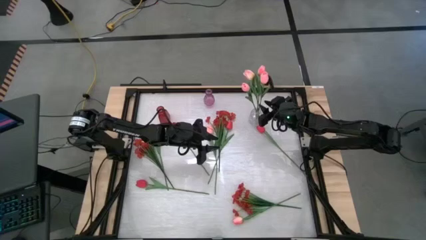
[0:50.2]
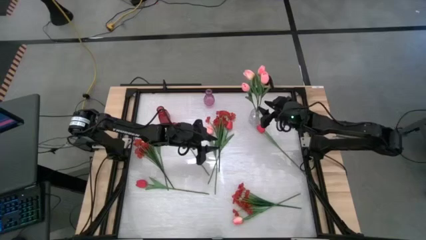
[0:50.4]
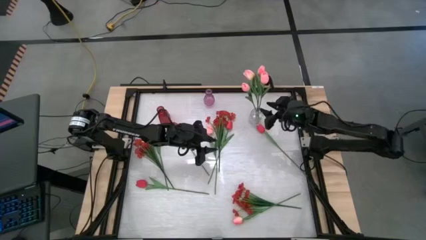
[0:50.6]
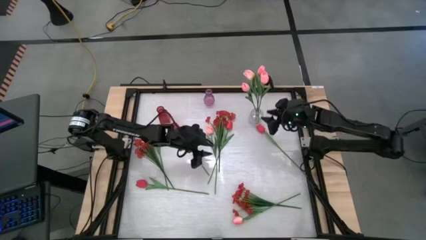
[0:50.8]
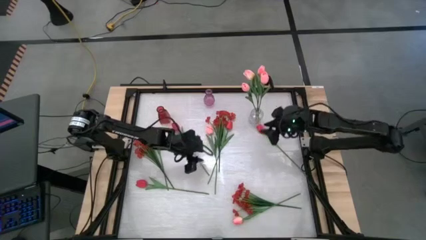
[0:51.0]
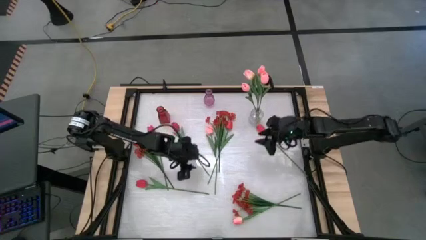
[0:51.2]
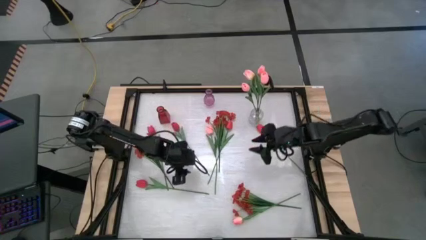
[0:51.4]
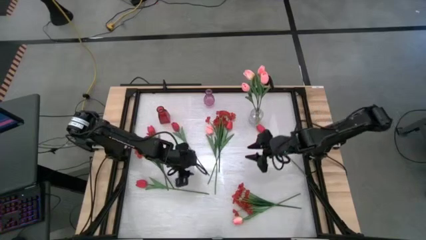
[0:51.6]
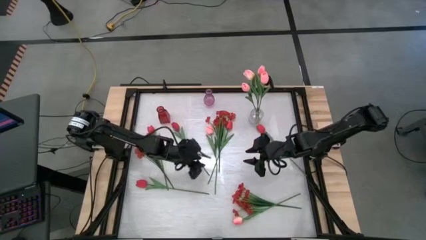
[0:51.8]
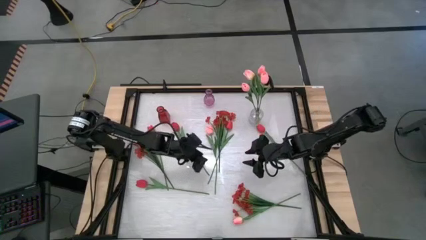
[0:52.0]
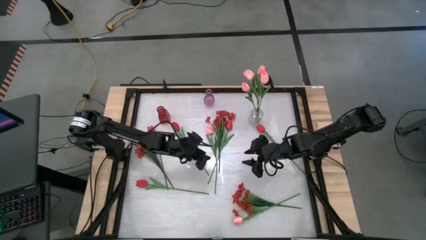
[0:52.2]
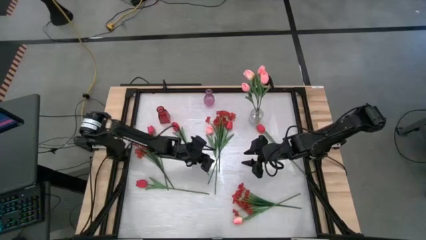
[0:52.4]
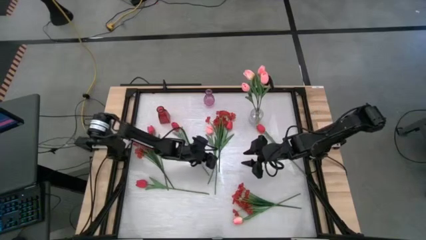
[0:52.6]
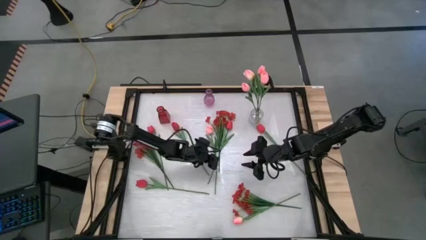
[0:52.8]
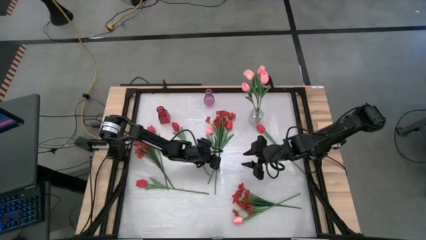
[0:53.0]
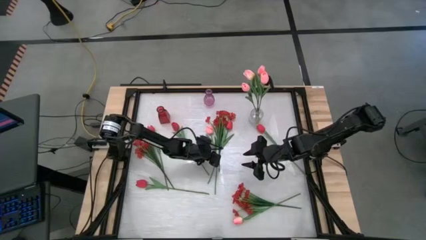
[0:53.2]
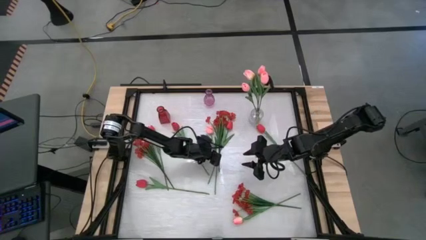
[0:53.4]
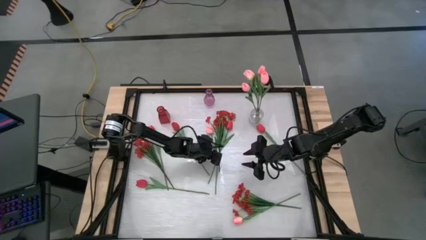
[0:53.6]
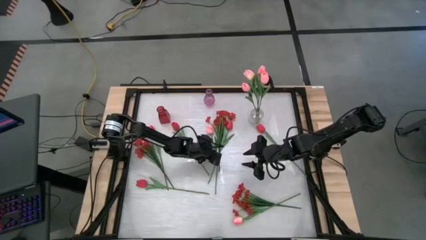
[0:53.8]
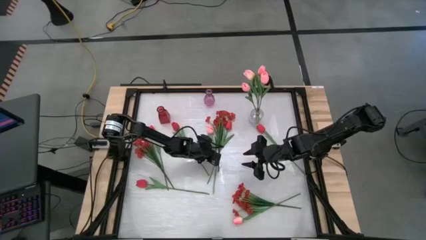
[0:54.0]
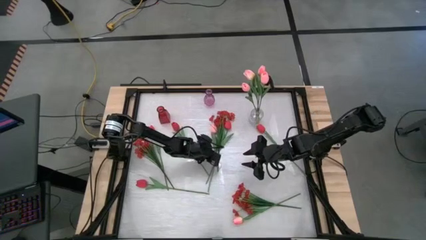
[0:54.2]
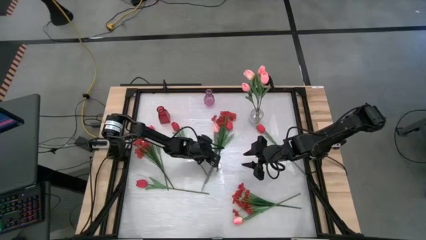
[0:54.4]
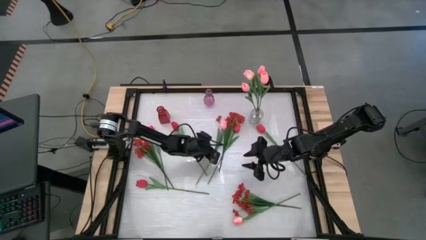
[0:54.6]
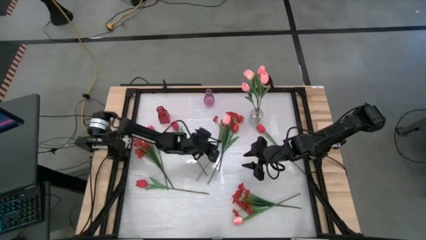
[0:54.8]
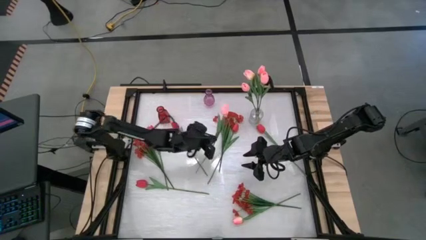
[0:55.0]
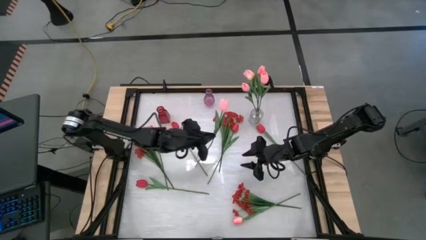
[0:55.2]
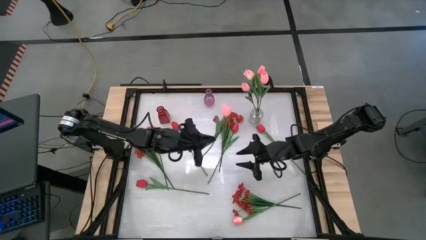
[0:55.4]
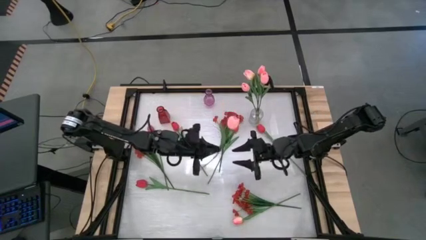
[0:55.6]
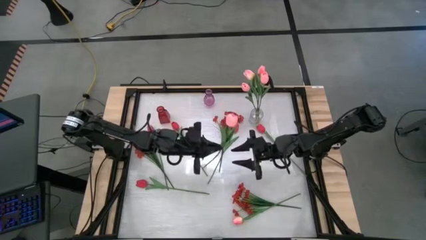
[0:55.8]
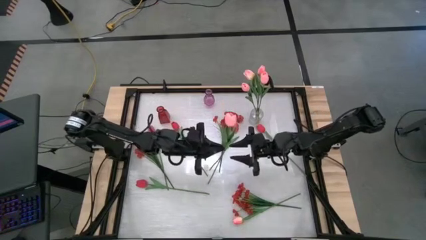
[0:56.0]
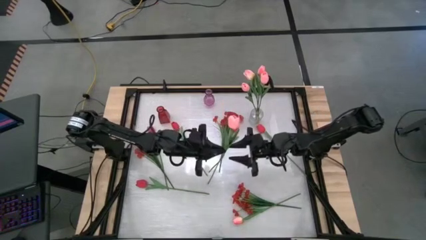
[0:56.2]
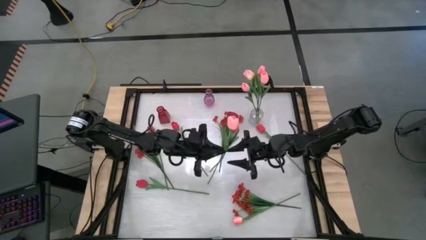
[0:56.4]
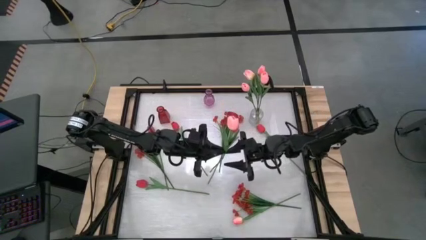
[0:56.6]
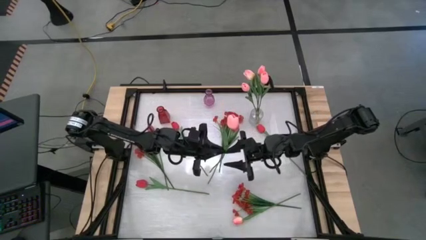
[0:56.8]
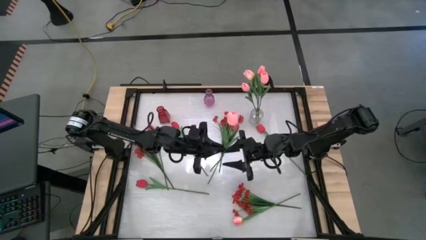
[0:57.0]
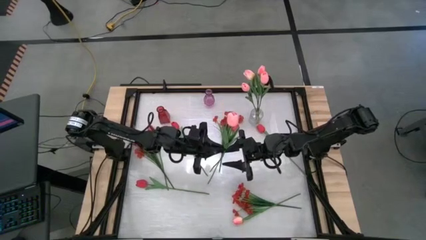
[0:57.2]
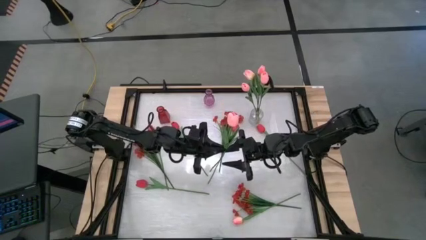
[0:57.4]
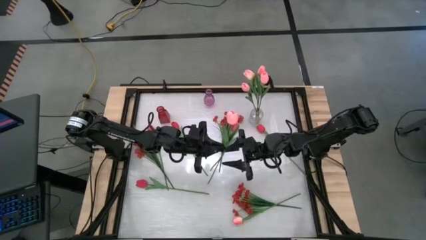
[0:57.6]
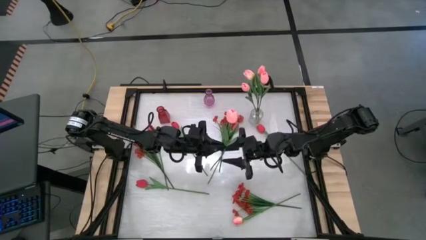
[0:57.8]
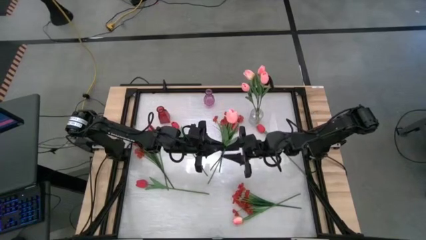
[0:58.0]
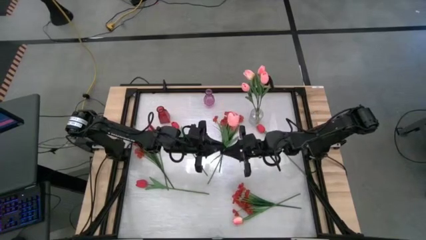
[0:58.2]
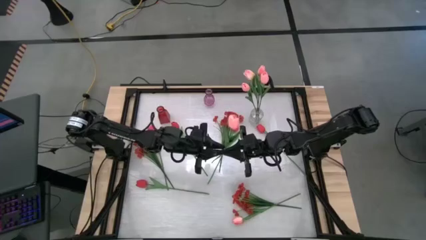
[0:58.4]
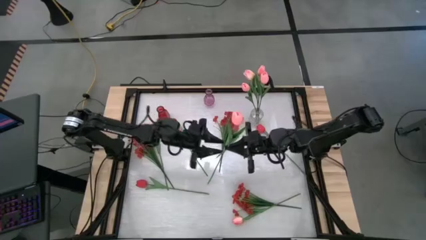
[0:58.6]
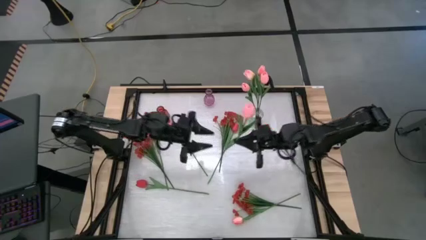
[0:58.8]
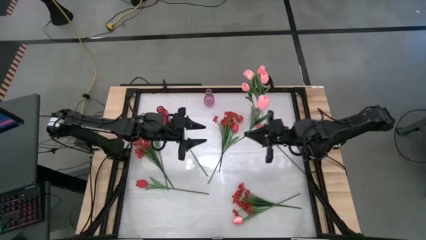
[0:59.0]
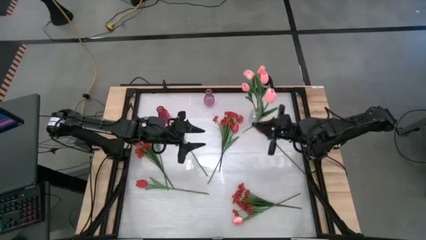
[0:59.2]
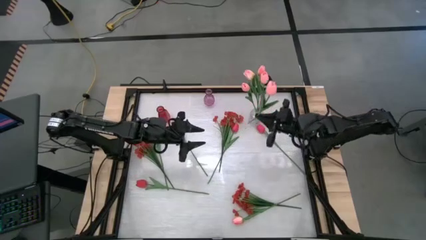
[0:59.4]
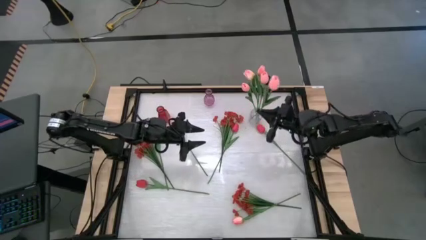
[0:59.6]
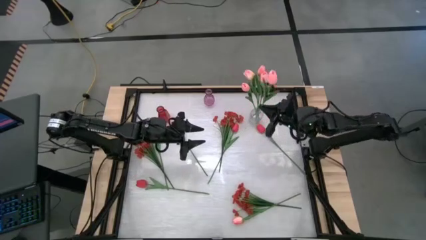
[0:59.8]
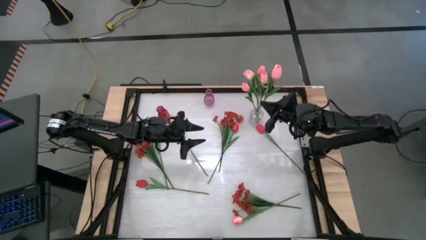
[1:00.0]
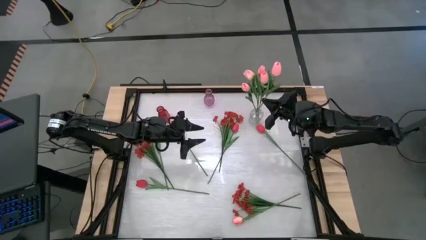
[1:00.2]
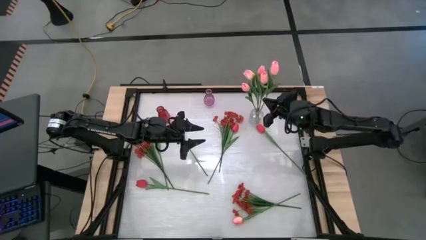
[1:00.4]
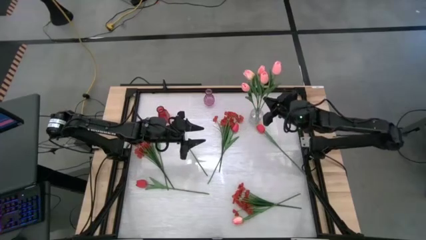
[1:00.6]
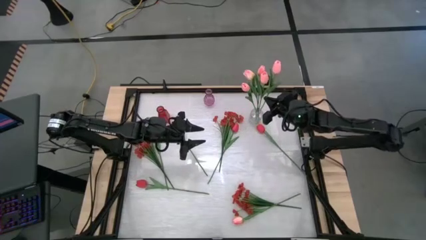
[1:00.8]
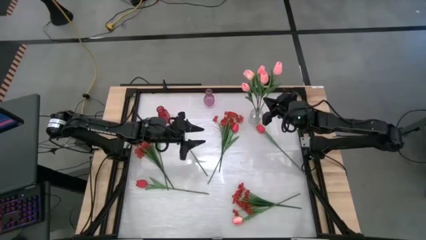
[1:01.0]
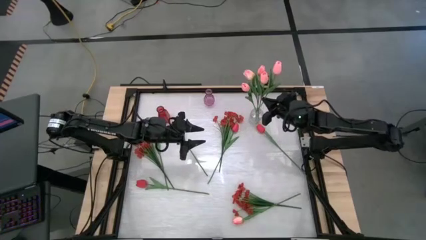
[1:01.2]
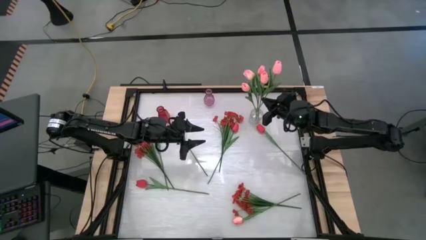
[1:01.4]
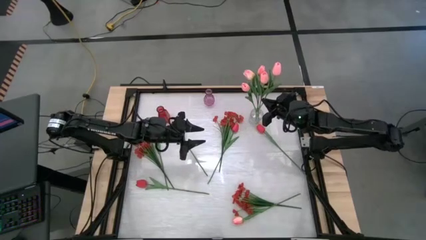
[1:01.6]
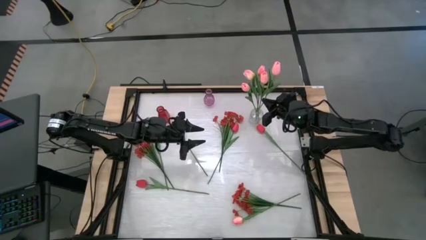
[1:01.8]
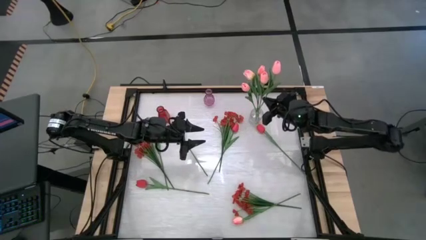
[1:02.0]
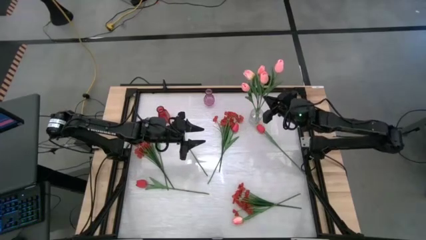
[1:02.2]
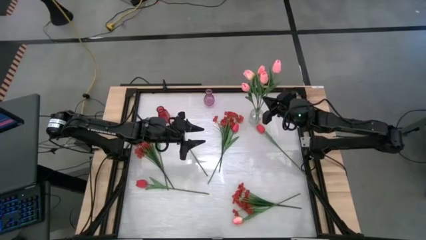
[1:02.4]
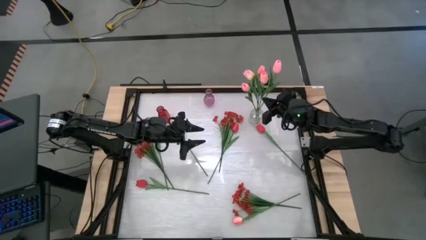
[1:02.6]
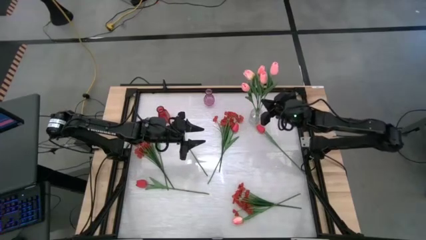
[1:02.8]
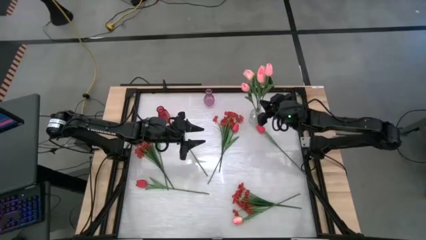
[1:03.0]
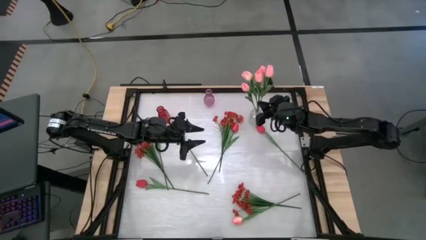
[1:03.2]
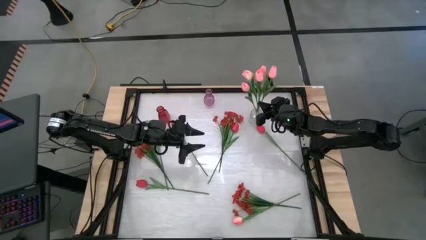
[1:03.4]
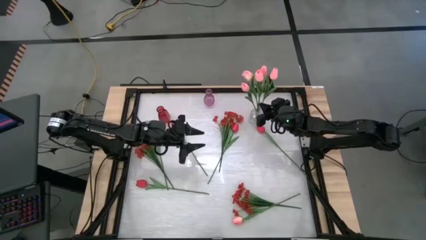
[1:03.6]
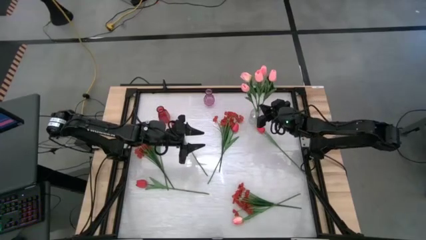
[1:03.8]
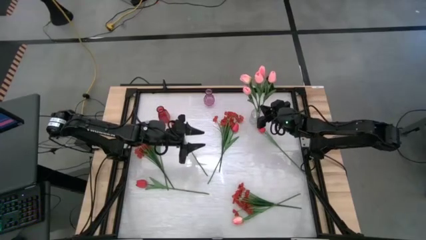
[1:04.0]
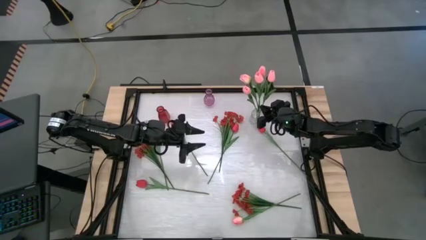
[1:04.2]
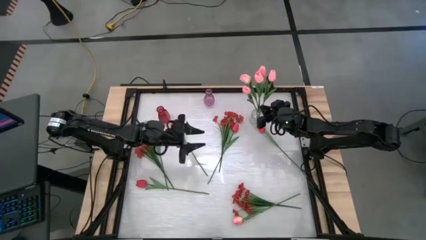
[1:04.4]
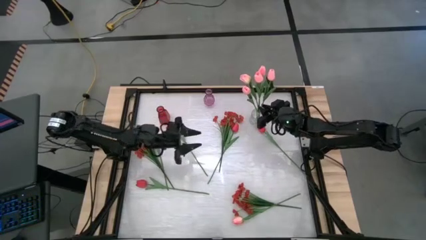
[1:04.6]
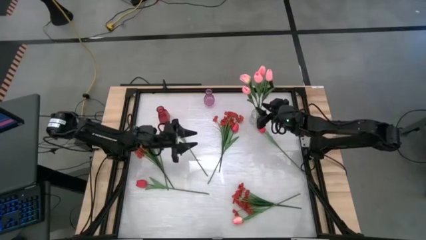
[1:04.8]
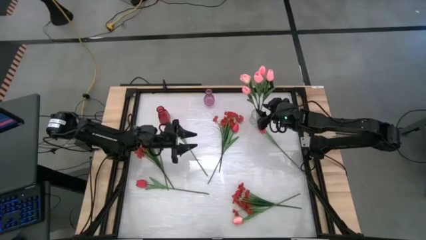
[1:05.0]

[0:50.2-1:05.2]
Task: Sort flowers into vase by color
Put the top pink tulip into the transparent vase
